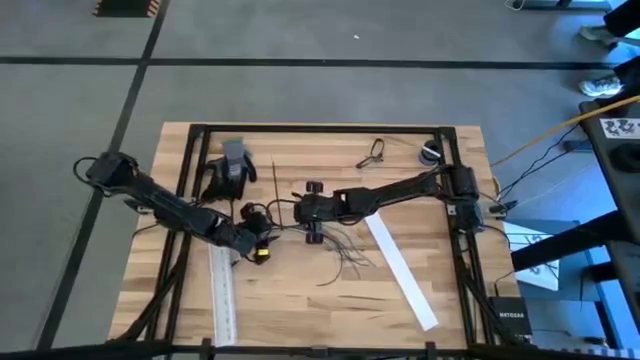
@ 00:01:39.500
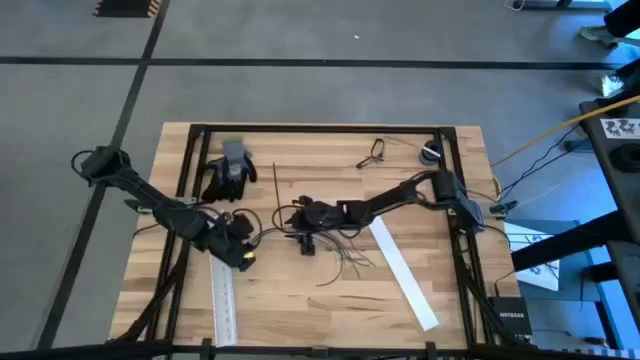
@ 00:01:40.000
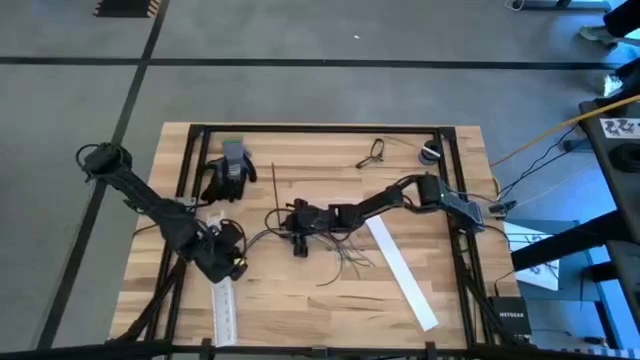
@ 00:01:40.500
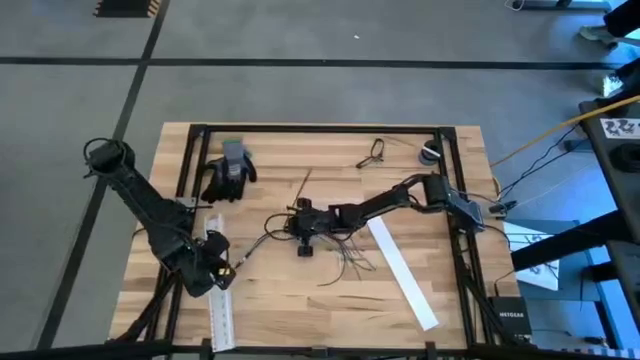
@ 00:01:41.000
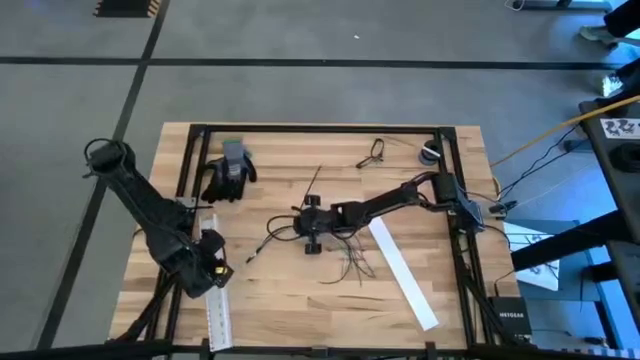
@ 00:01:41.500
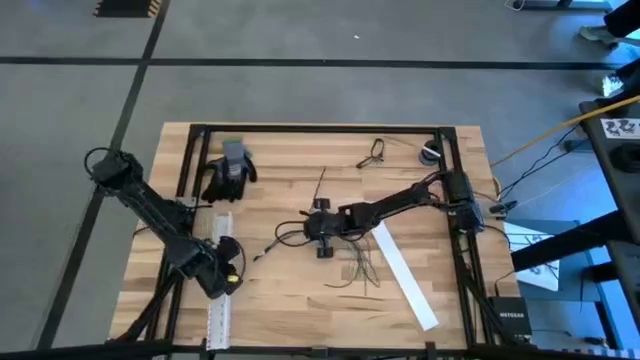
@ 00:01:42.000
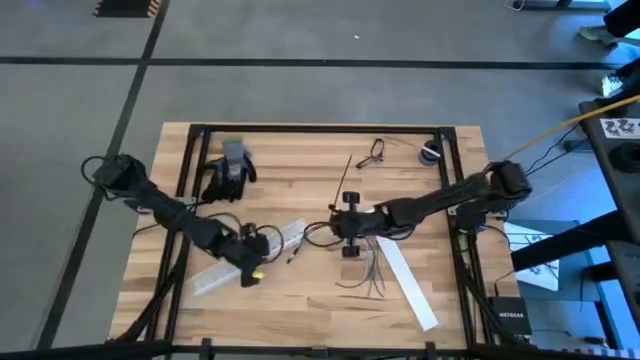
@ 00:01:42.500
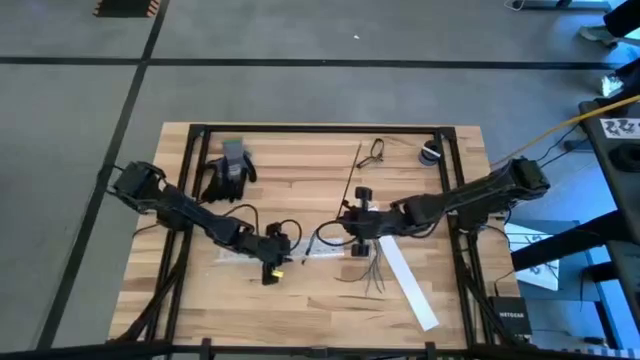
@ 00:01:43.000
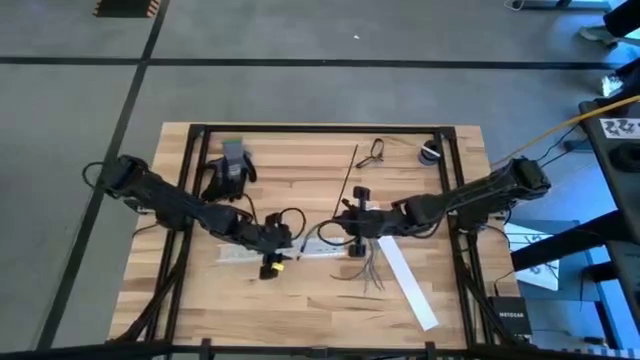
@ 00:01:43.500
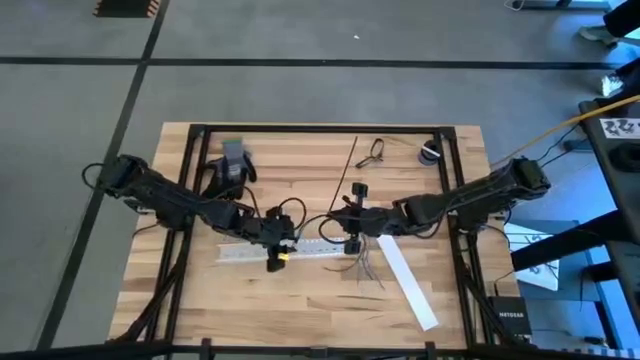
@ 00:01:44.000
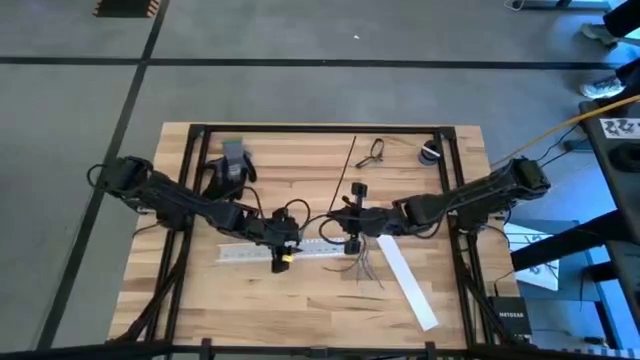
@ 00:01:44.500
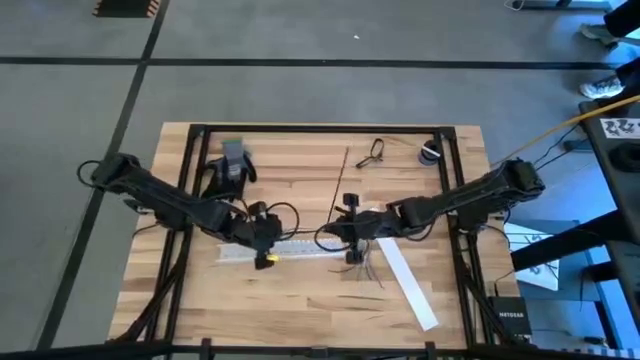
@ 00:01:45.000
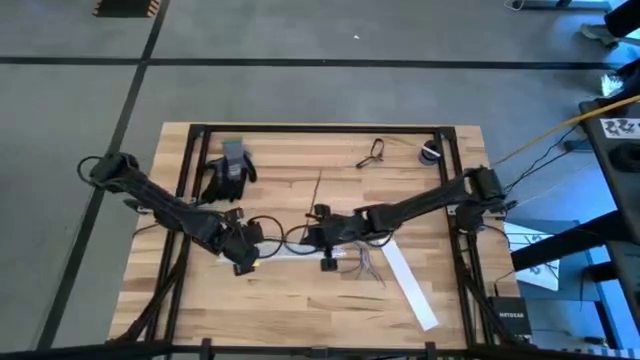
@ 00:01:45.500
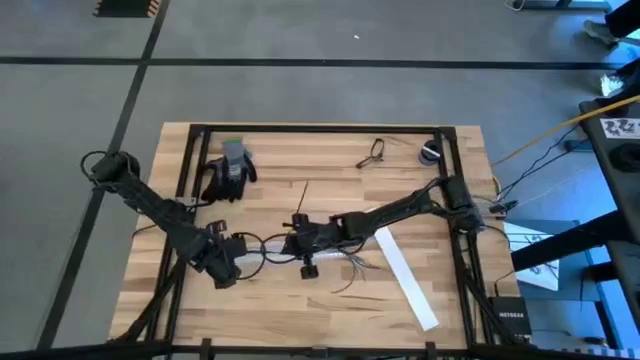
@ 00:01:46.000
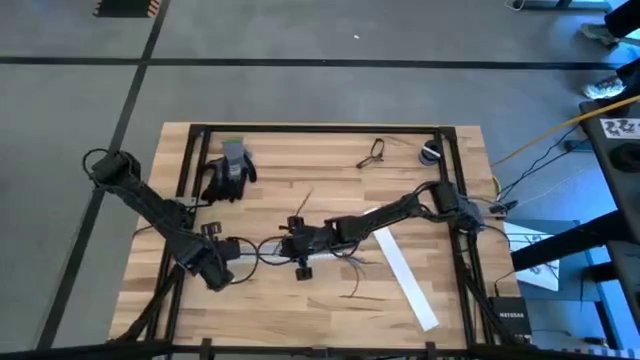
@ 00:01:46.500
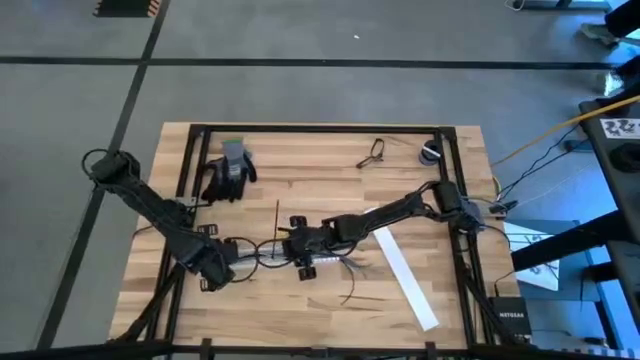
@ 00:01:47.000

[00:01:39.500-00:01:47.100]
Task: Ziptie cables
Put the cable wires in the white cable duct

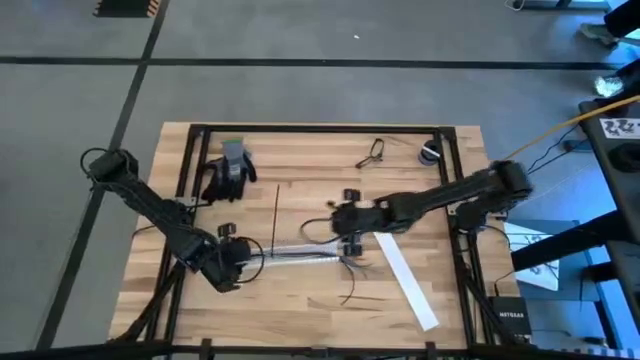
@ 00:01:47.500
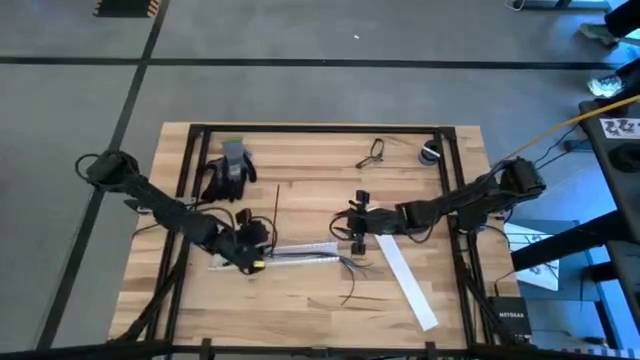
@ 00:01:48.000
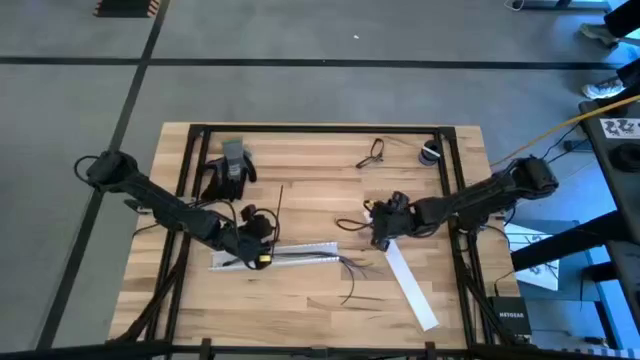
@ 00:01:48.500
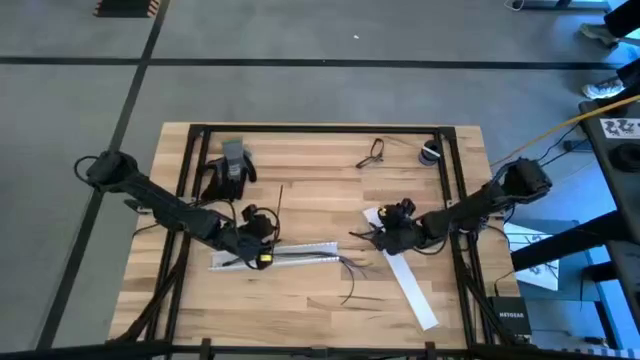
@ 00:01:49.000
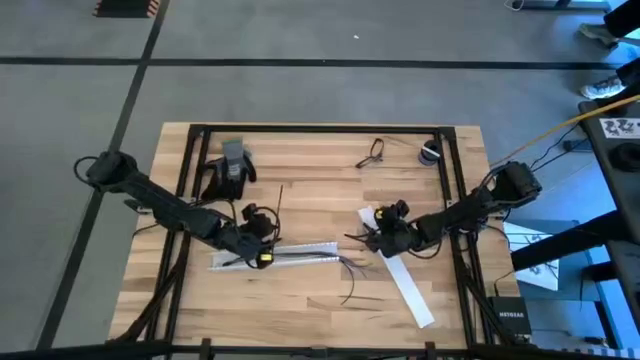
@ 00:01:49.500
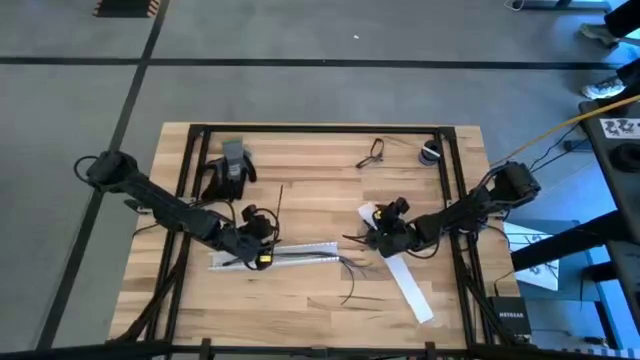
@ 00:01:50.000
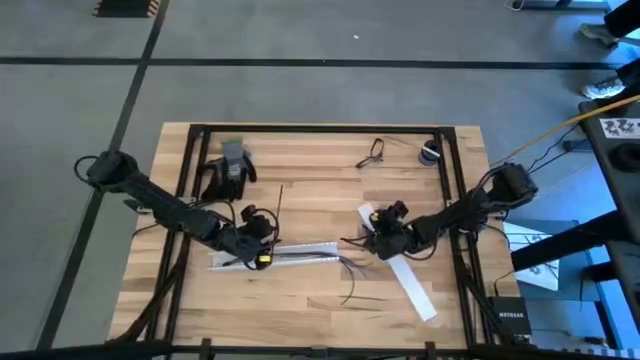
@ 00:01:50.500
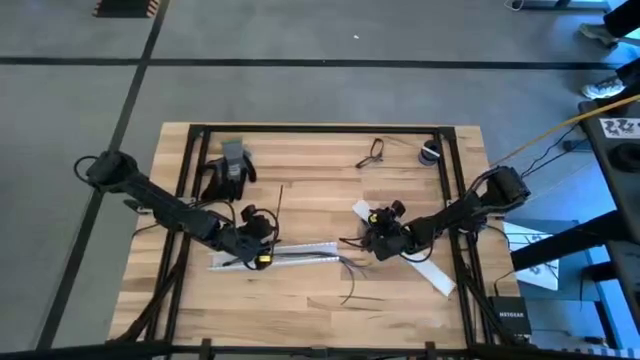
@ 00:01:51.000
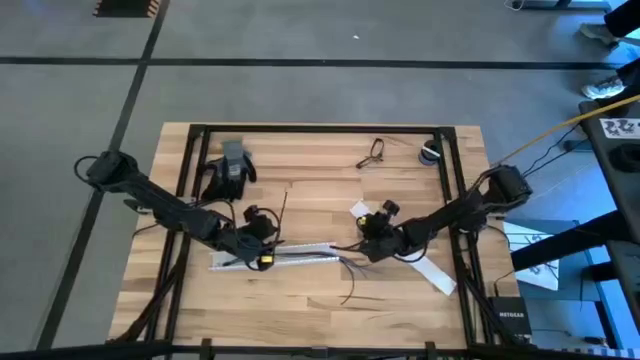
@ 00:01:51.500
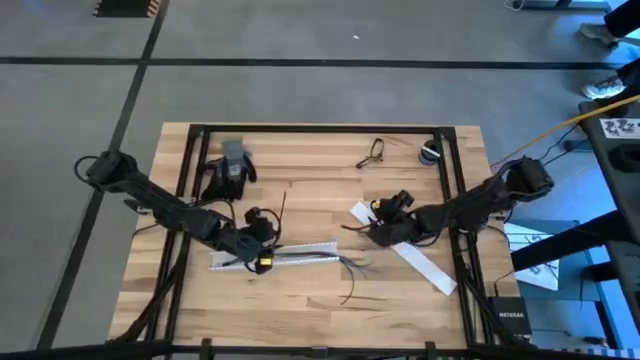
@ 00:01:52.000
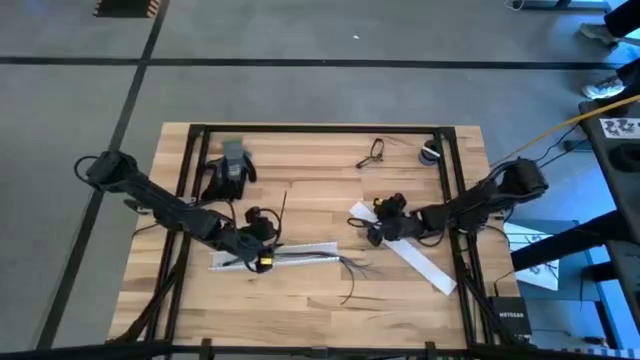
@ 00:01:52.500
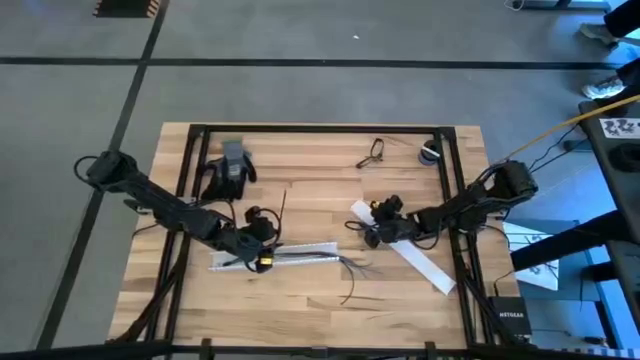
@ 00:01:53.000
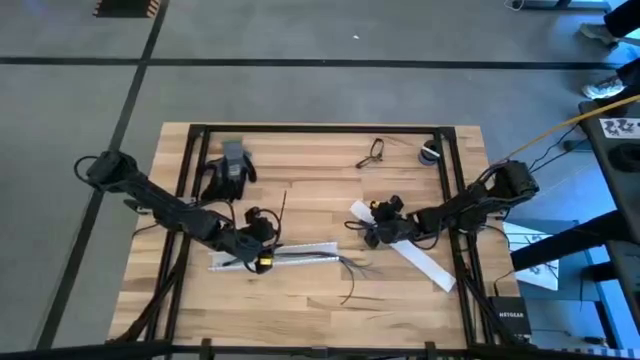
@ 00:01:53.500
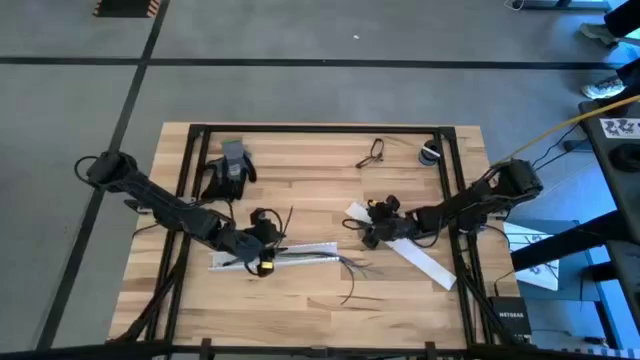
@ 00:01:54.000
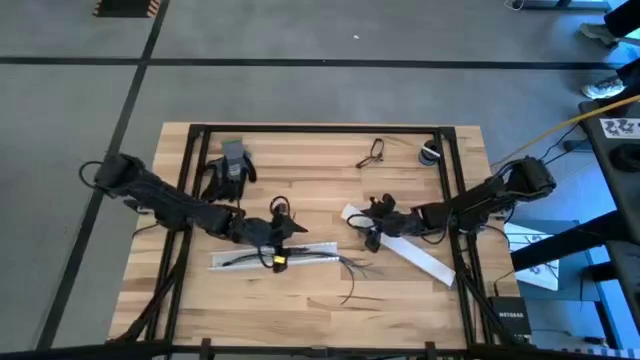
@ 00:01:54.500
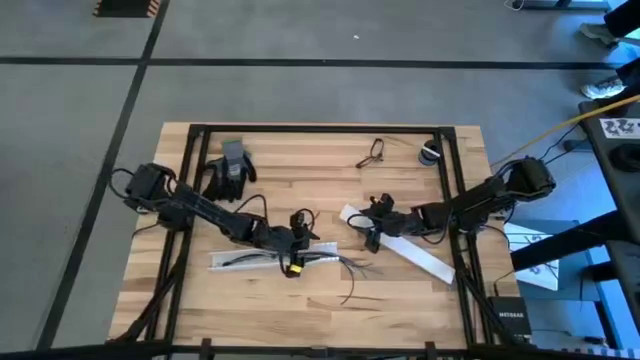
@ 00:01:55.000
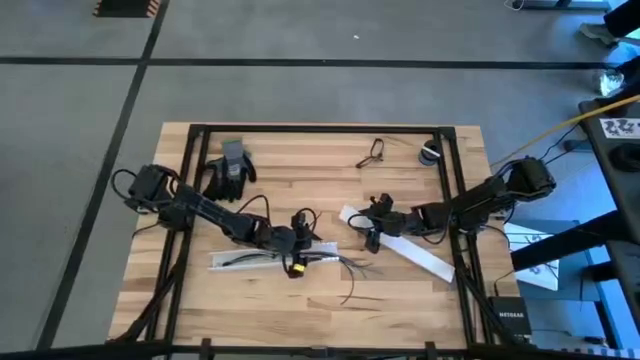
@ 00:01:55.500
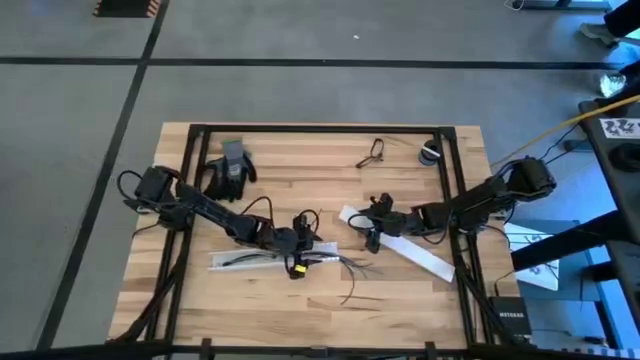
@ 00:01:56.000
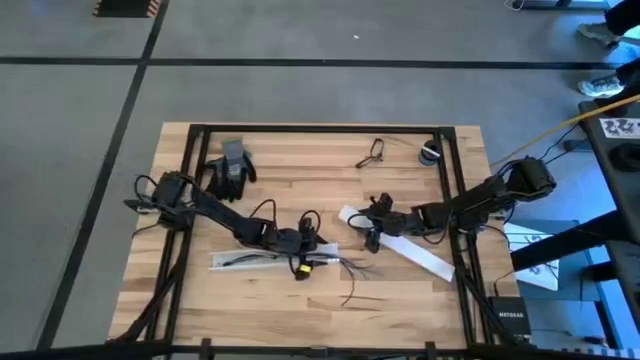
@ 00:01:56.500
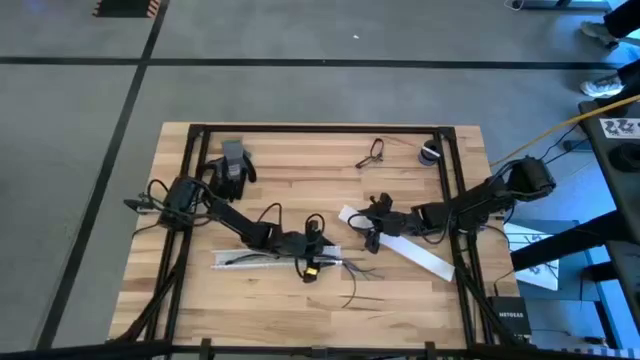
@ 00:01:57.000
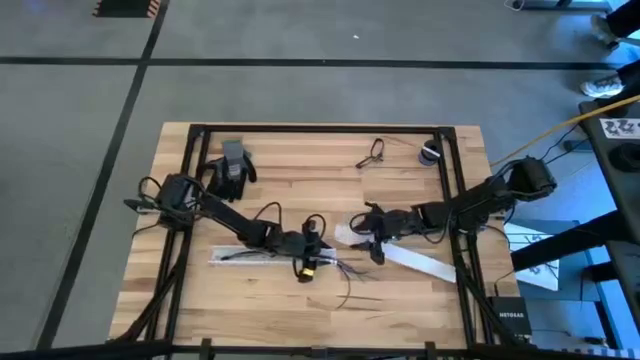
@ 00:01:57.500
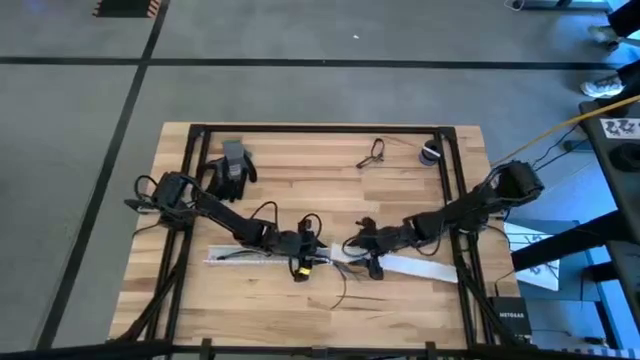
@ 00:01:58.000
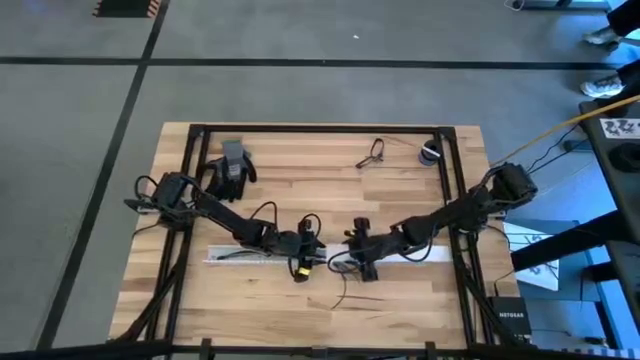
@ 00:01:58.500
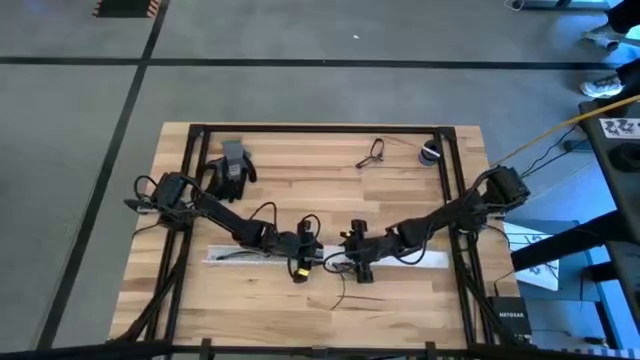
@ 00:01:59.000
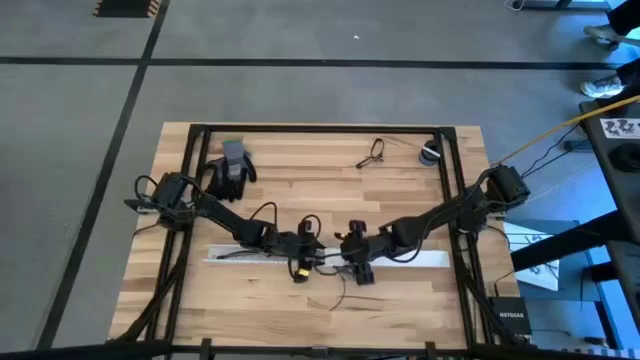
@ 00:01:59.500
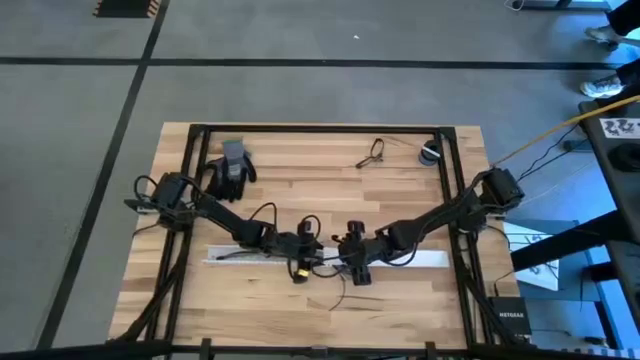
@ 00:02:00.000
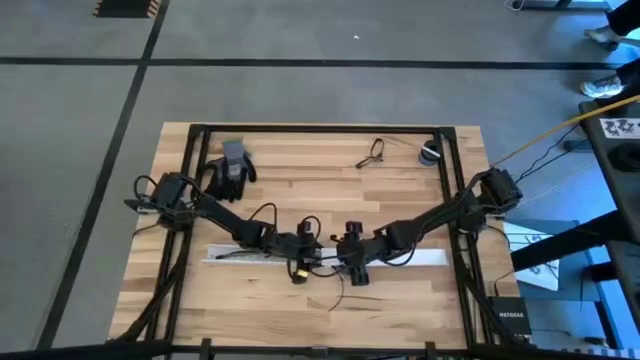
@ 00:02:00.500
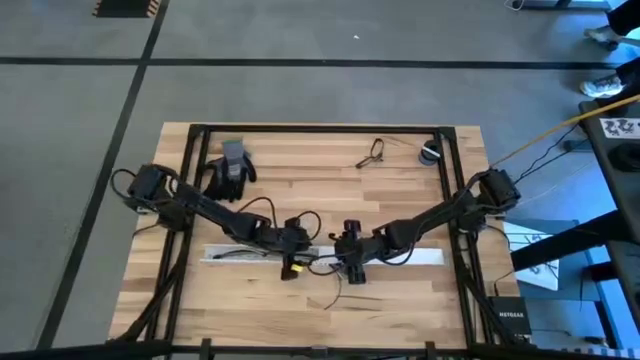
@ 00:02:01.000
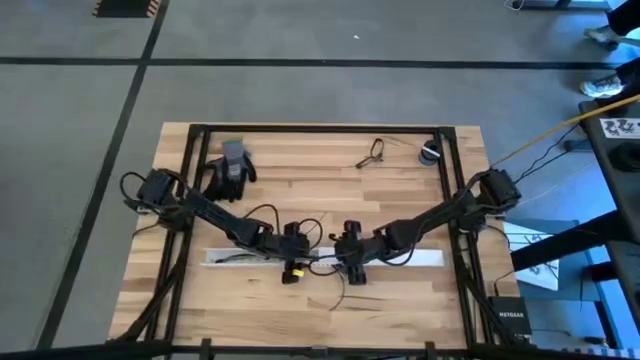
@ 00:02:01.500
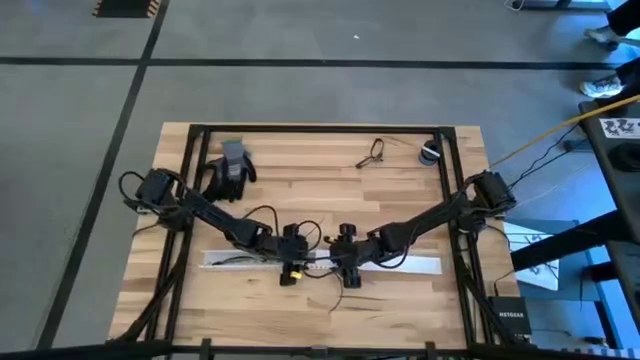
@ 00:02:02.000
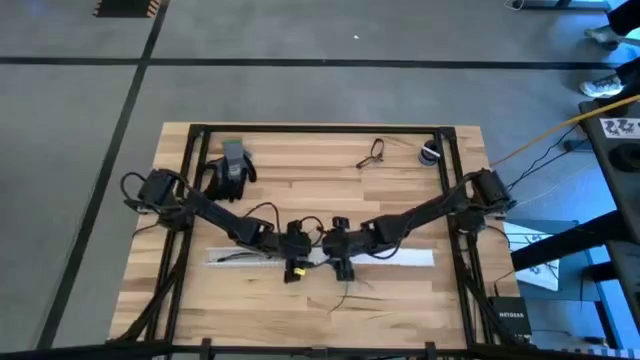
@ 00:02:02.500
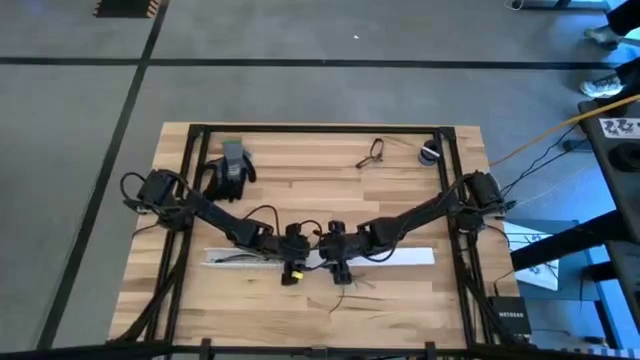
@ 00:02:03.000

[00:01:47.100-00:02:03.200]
Close the cable duct
